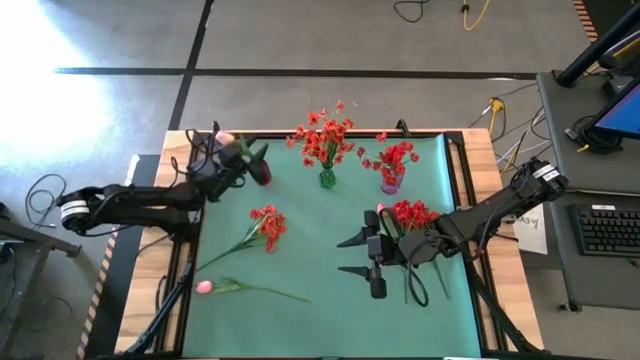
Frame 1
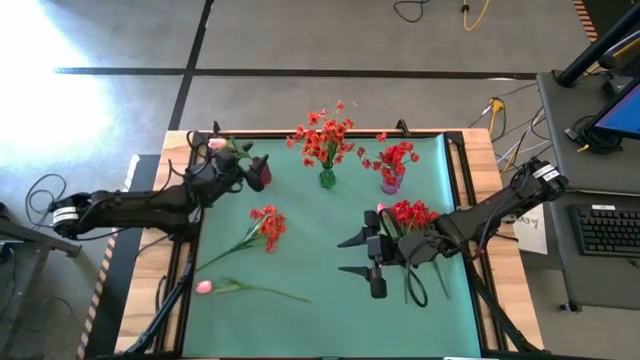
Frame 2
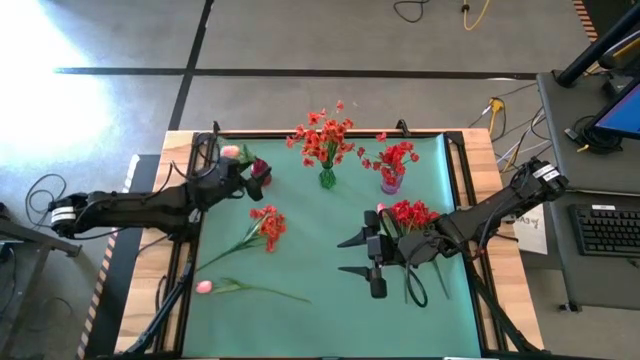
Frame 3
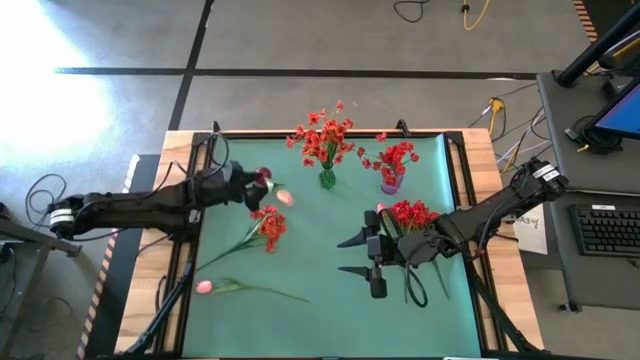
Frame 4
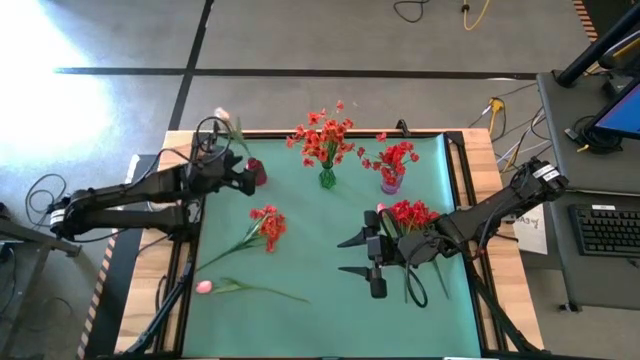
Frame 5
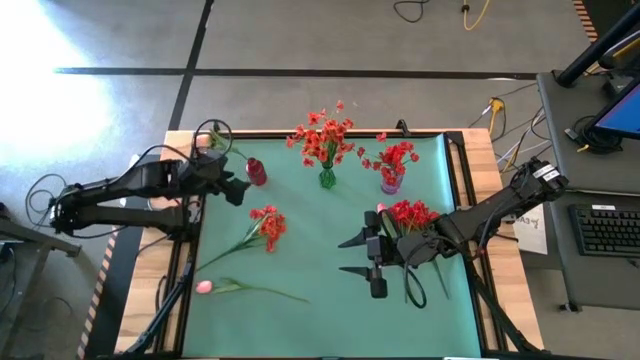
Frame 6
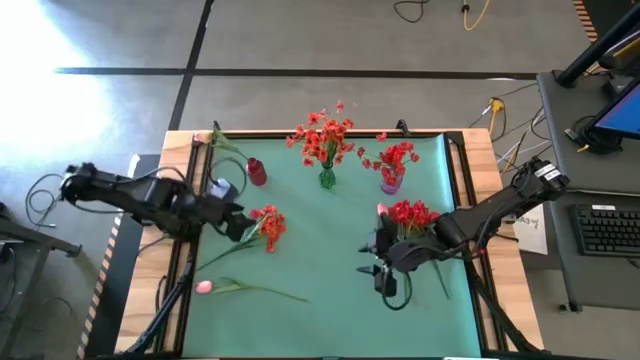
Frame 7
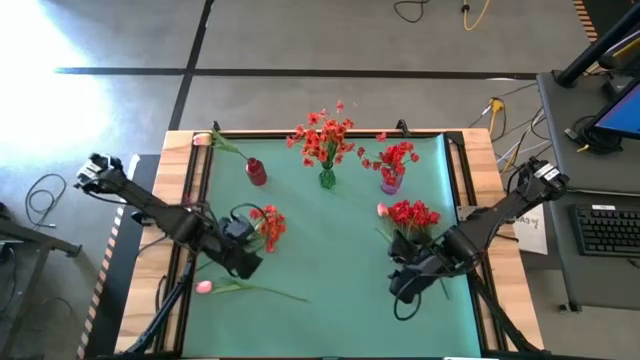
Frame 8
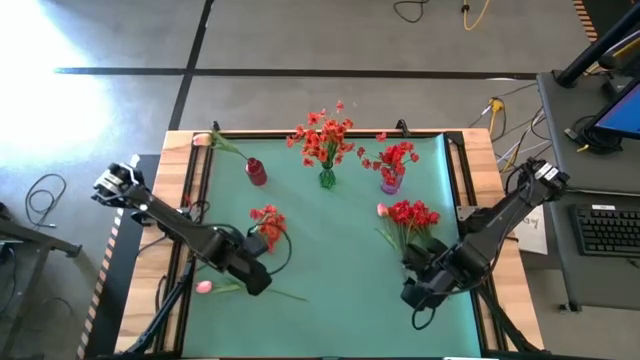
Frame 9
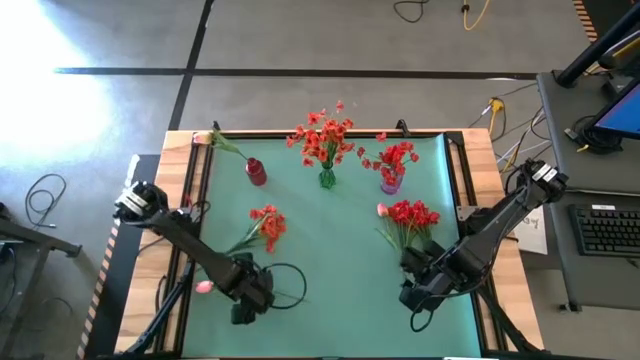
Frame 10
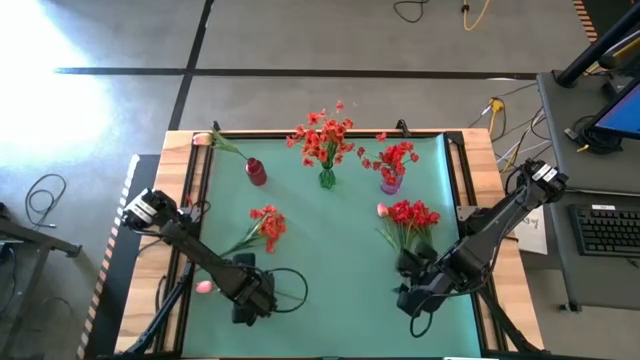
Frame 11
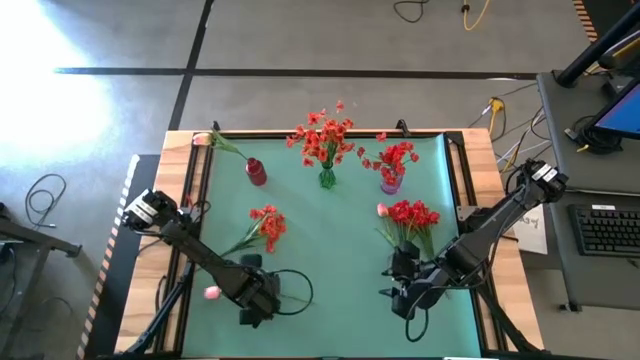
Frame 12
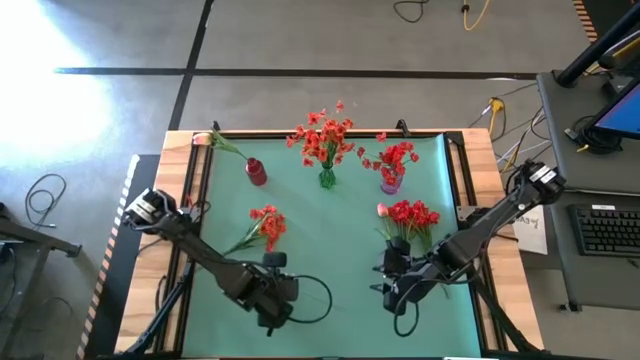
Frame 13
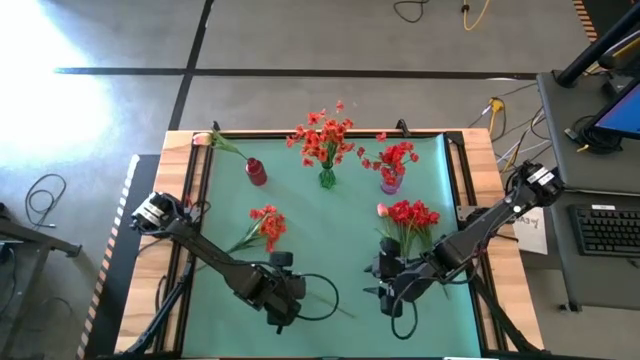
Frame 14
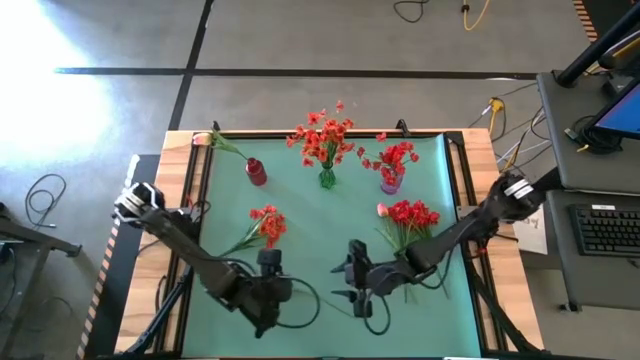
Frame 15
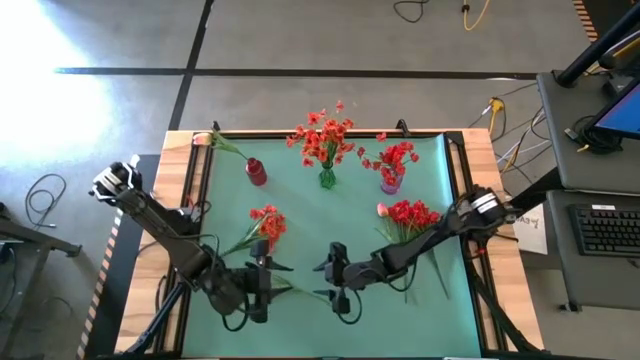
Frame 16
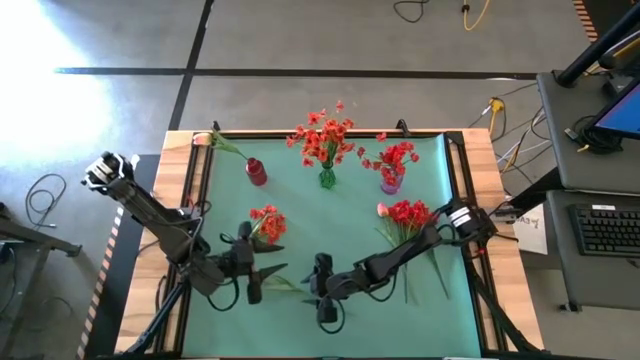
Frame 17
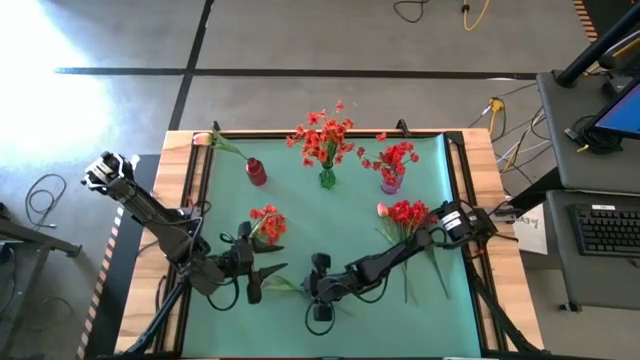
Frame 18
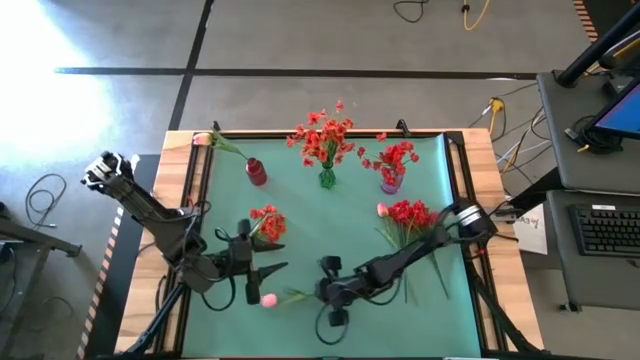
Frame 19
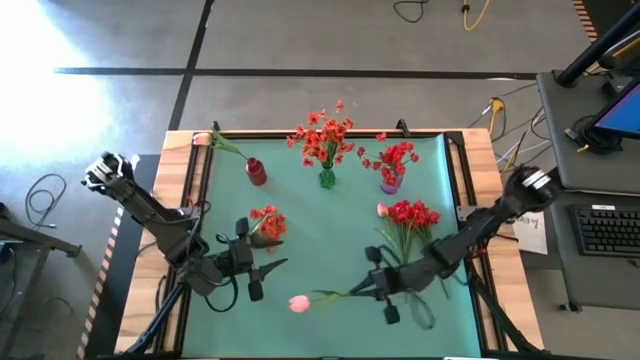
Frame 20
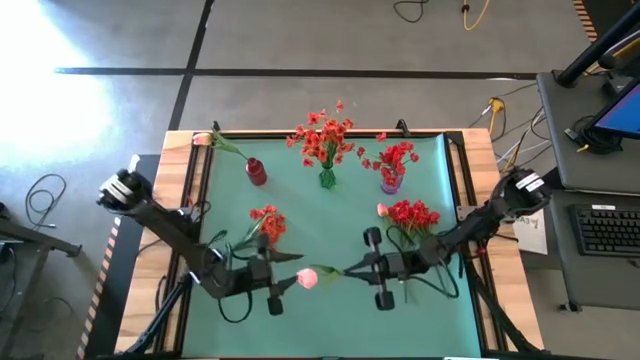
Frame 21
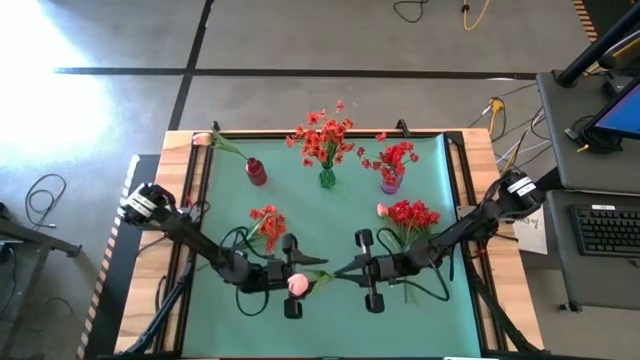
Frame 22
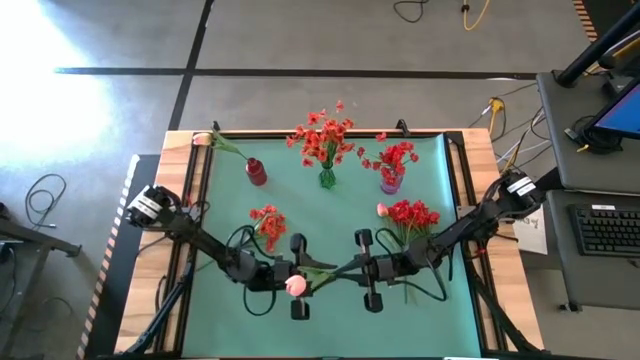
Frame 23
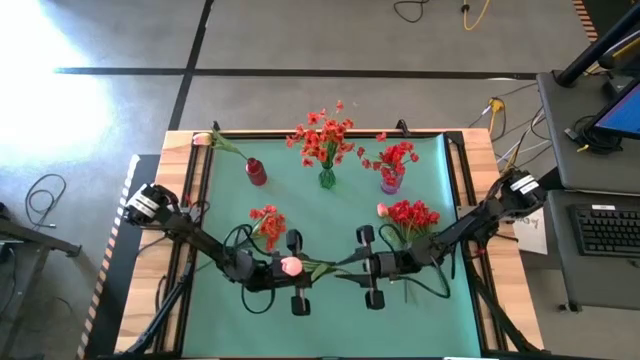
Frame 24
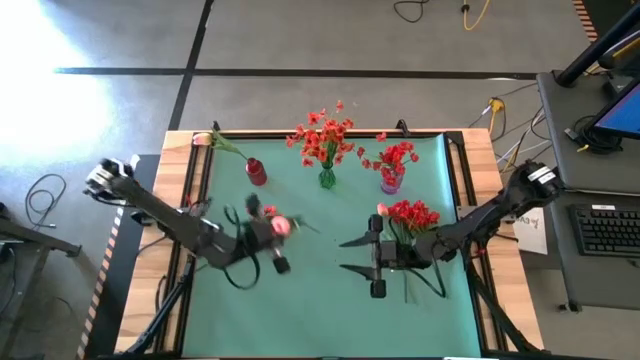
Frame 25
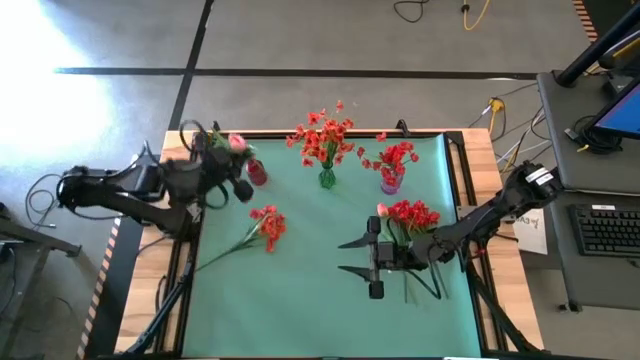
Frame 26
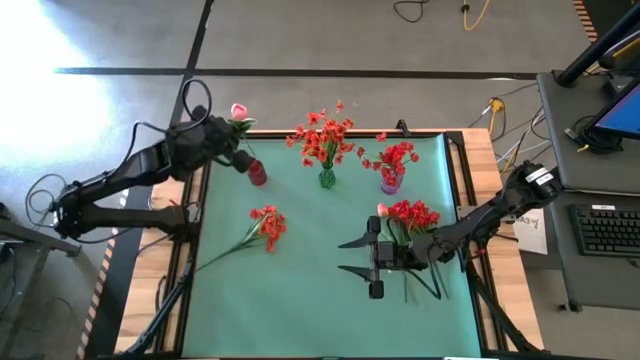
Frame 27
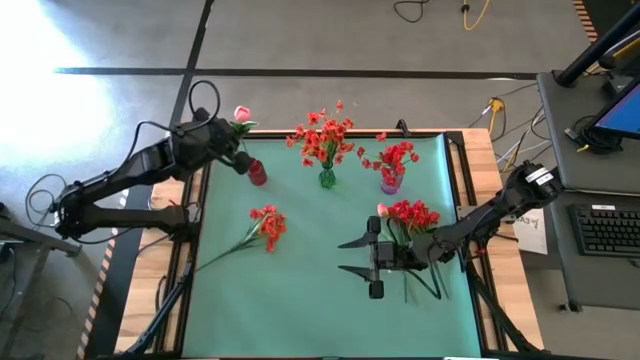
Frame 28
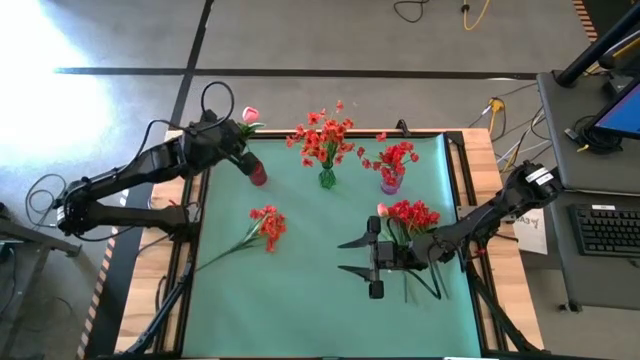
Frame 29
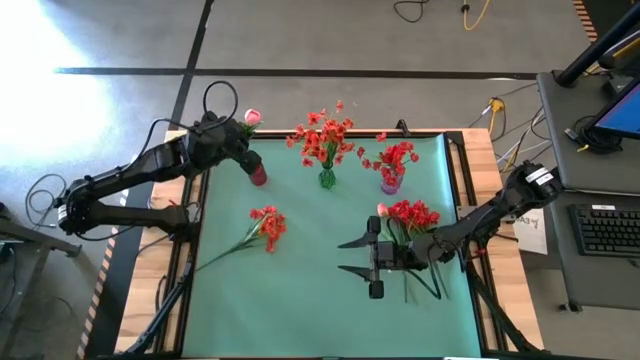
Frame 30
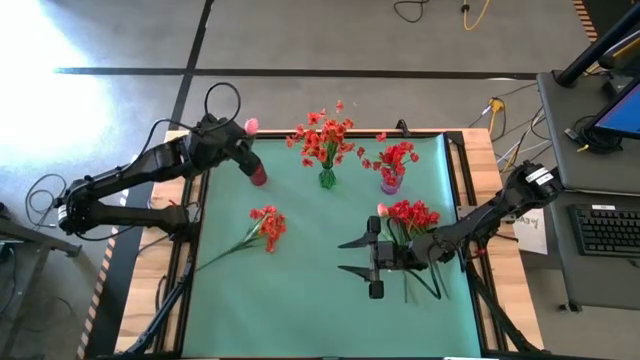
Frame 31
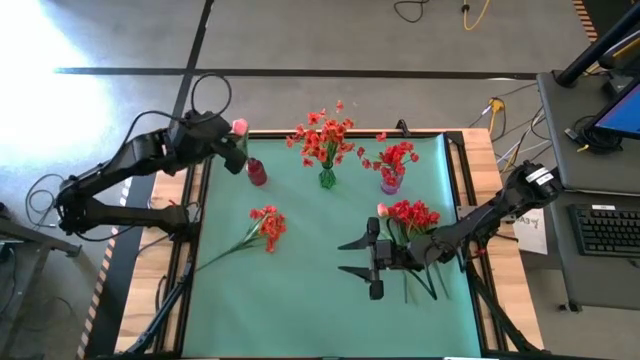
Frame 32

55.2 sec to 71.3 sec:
Task: Sort flowers into vase by color
Put the bottom pink flower in the red flower vase

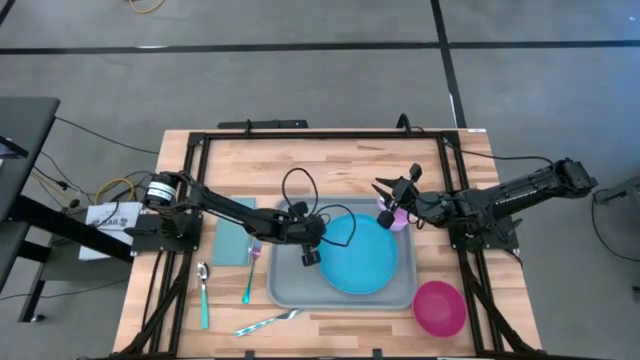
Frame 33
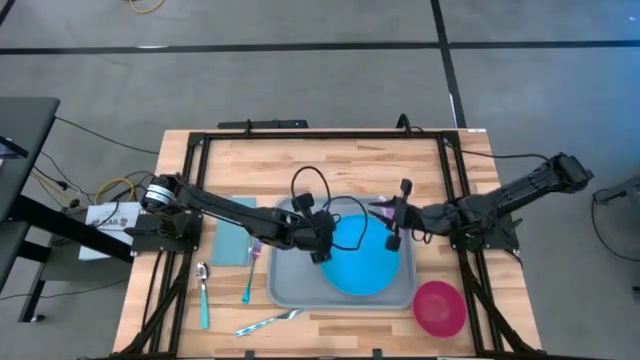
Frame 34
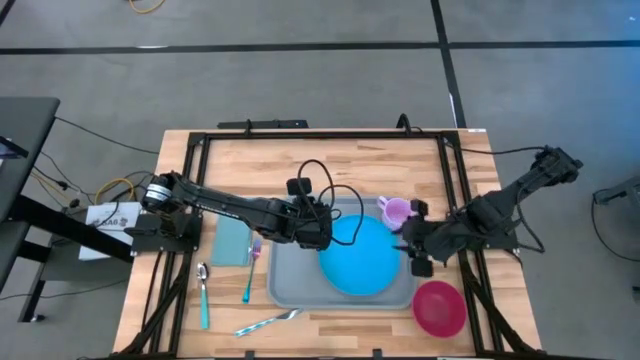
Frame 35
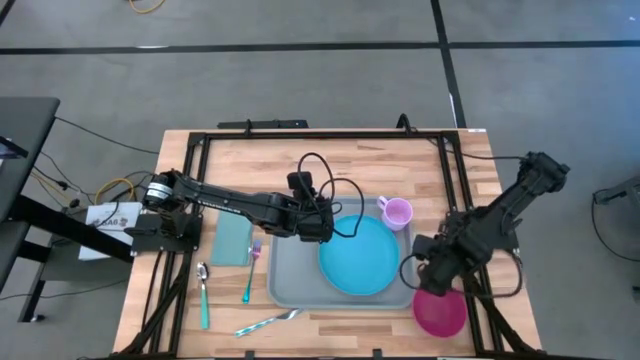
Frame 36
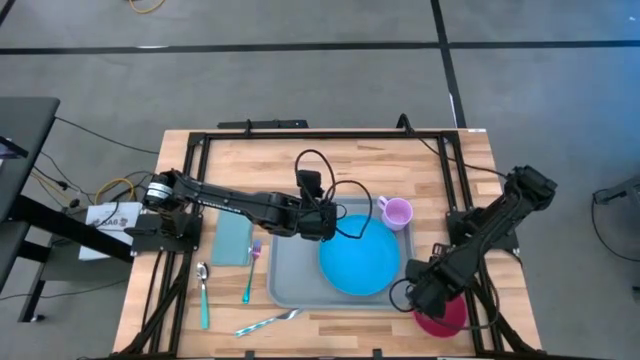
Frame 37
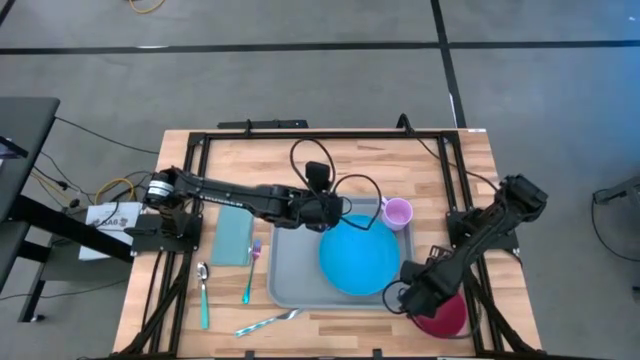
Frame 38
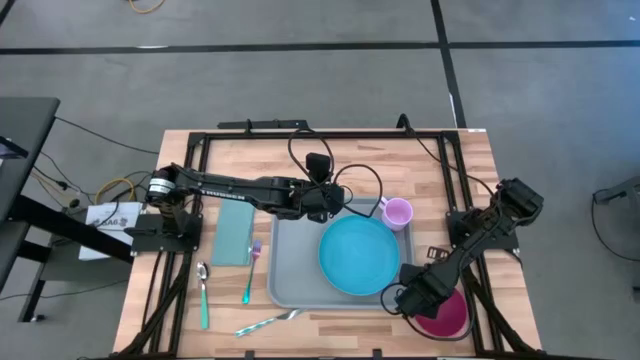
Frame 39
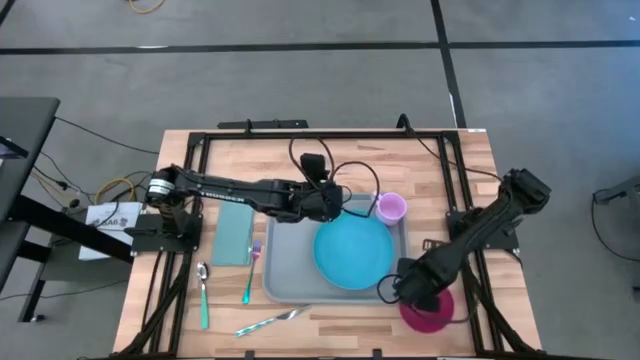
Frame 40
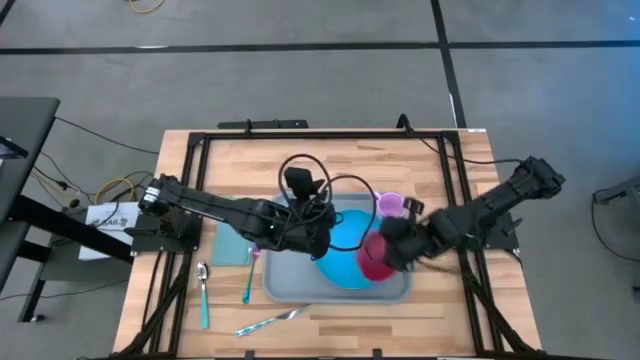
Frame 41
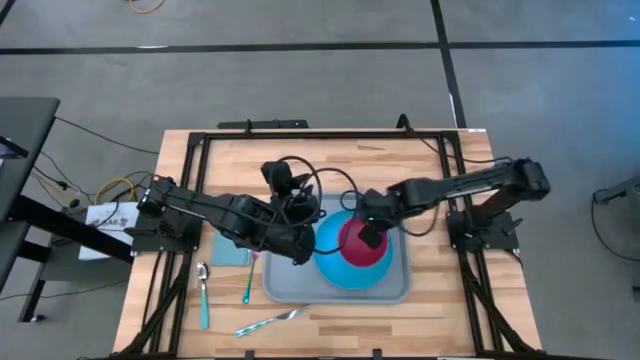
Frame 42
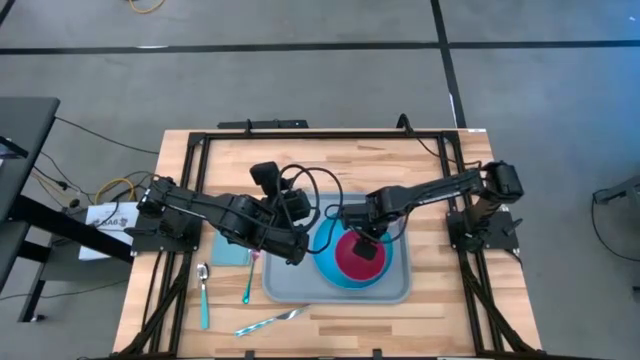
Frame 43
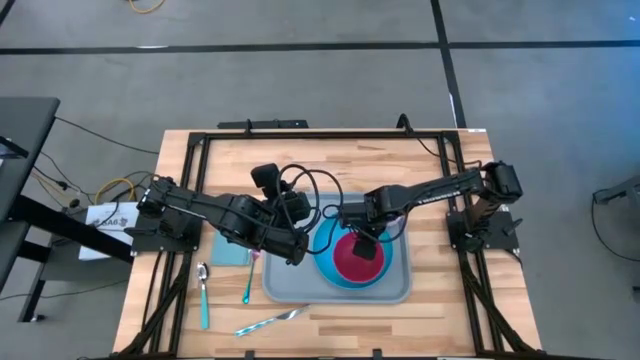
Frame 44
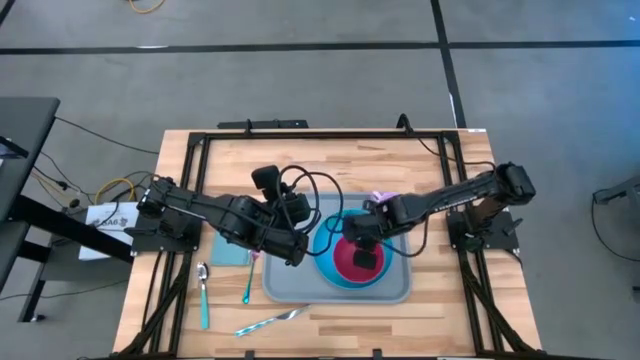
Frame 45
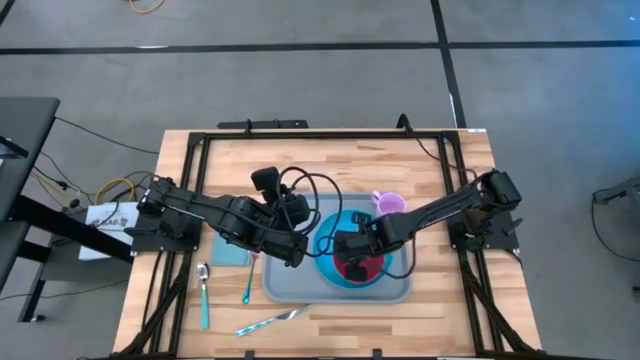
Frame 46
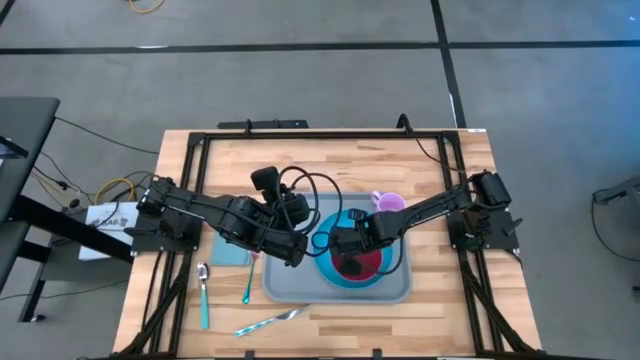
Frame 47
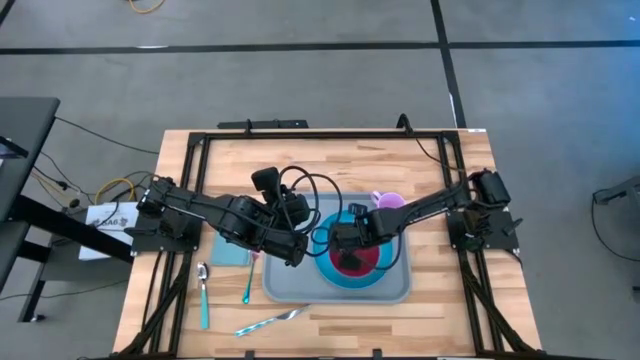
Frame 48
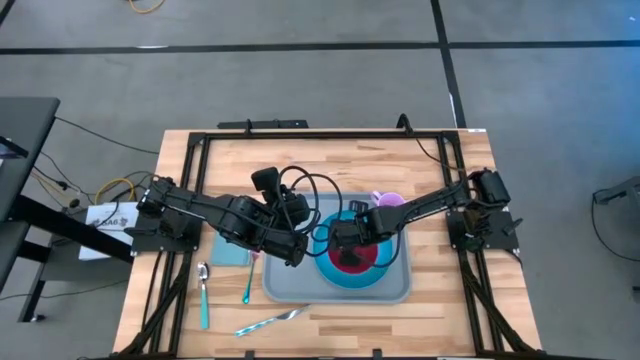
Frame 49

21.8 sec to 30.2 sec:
Task: Set up tray
Put the red bowl on top of the blue plate on the gray serving tray
